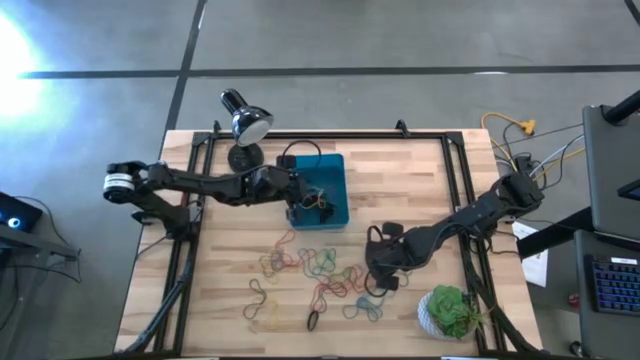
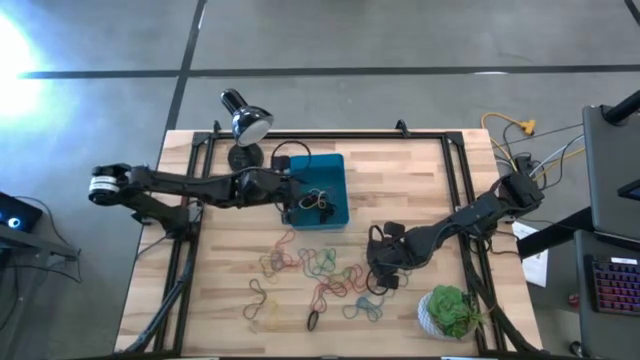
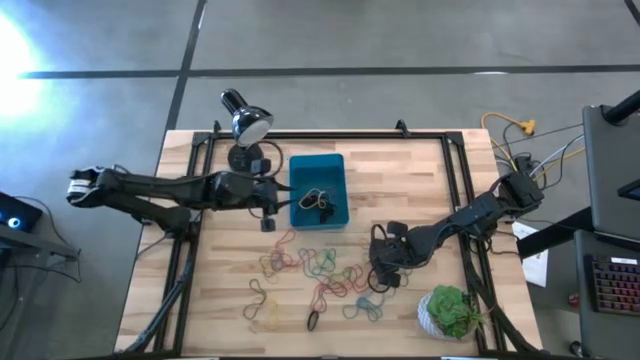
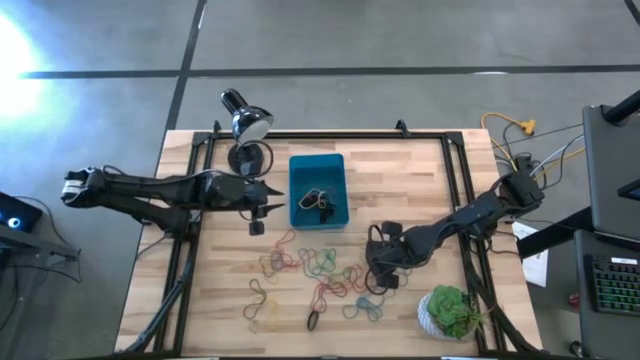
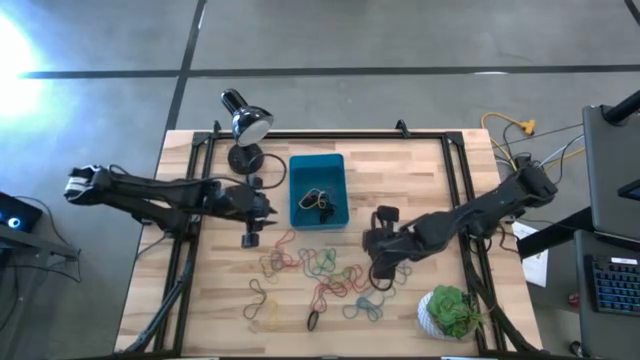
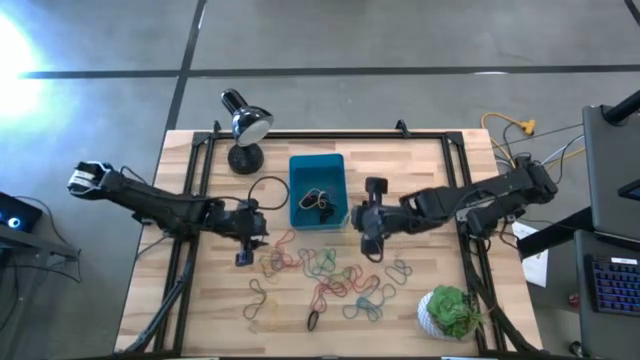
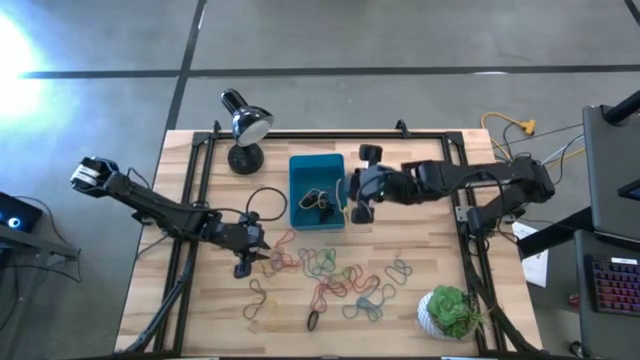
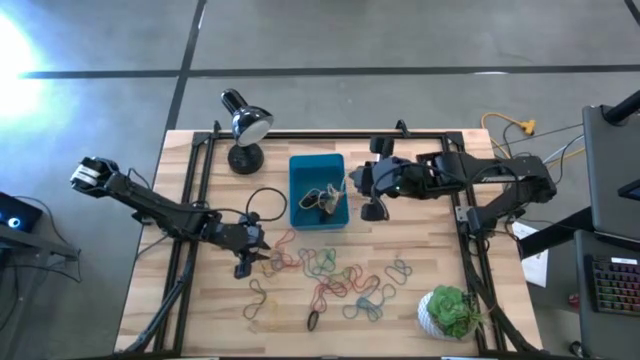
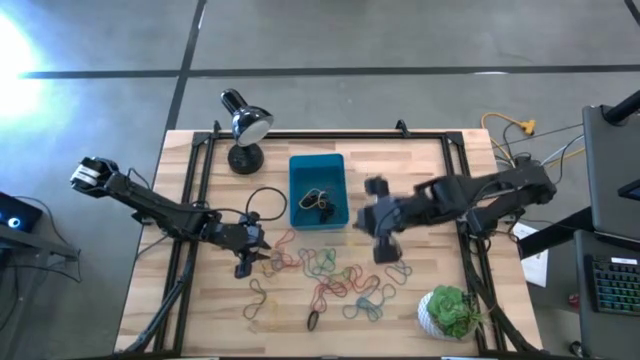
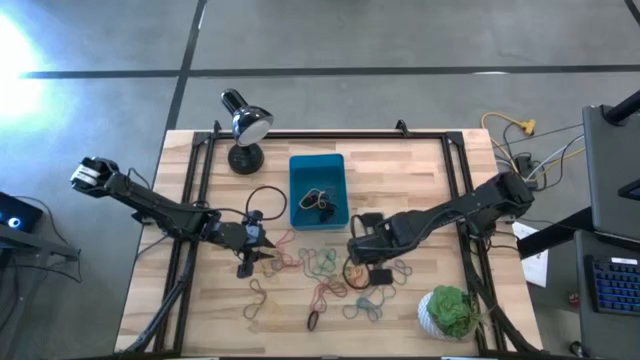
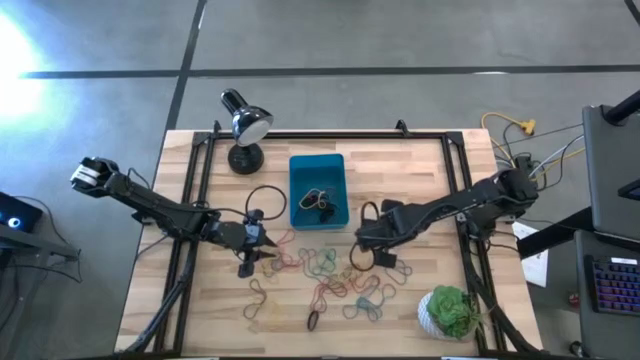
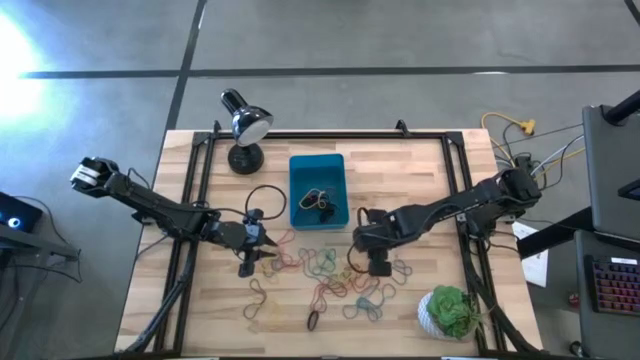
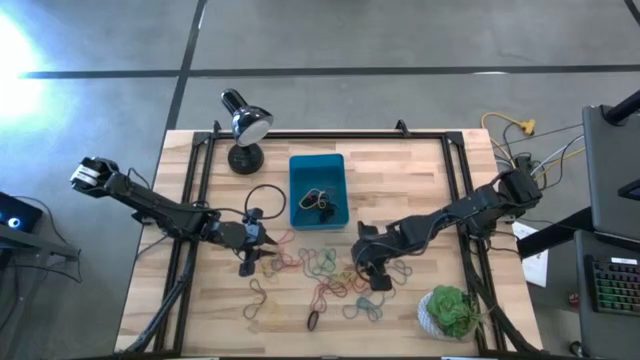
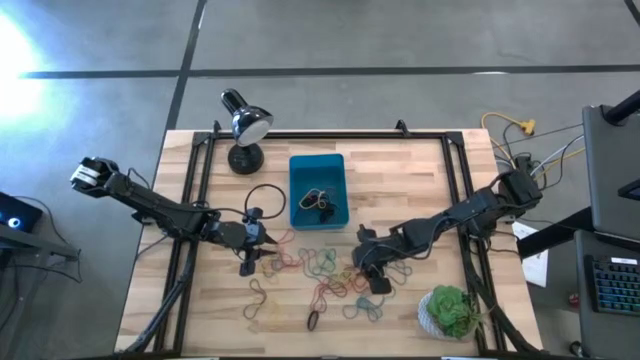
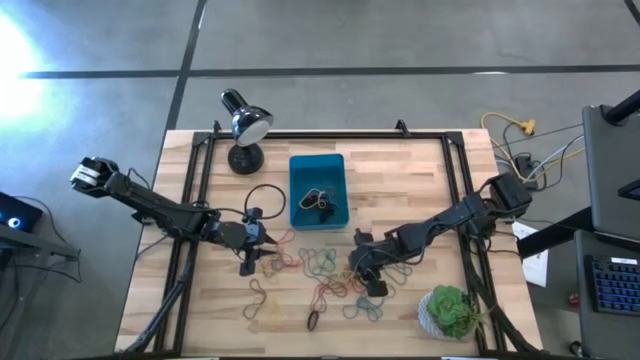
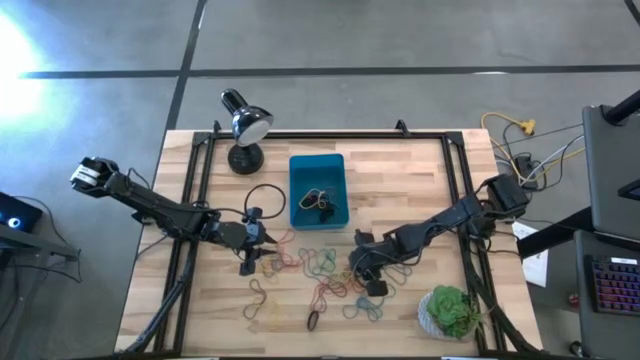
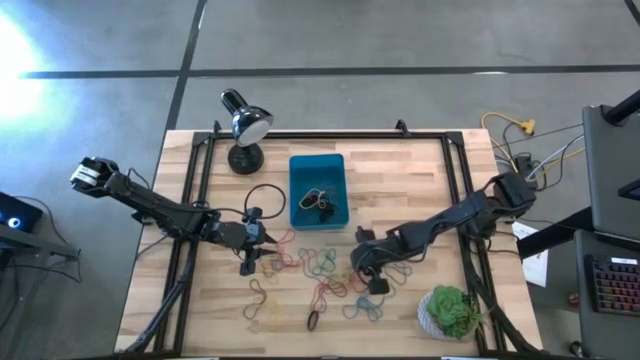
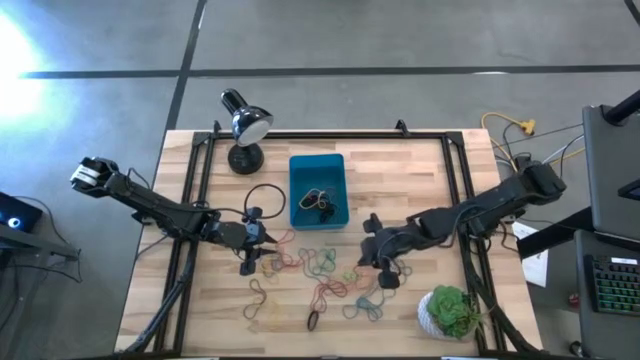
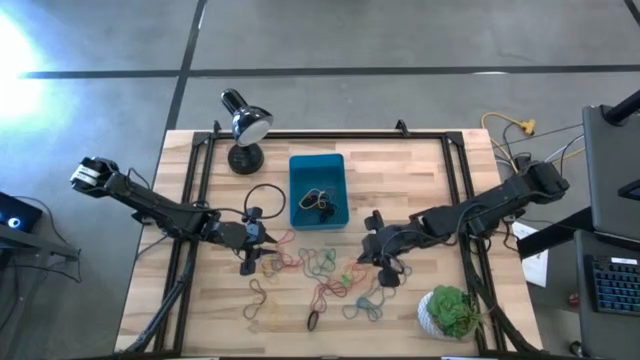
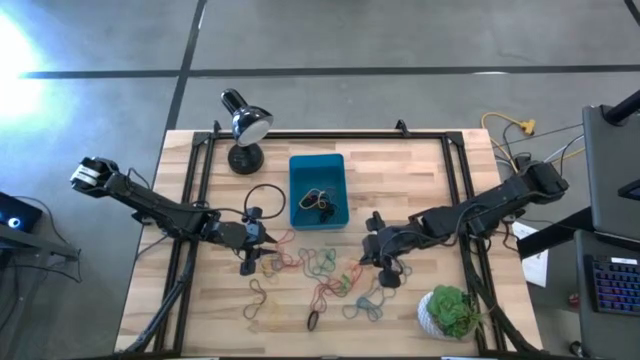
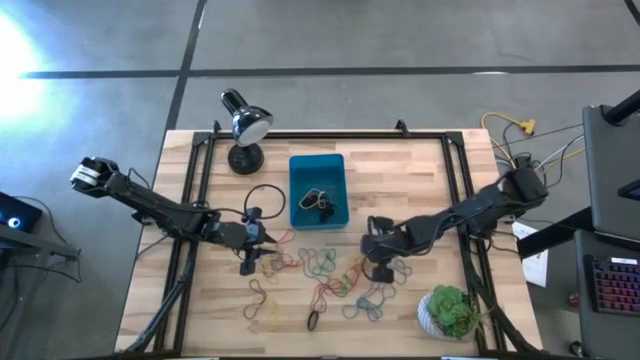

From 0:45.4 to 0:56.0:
Task: Pick and place rubber bands into bin
Put the yellow rubber band into the blue bin

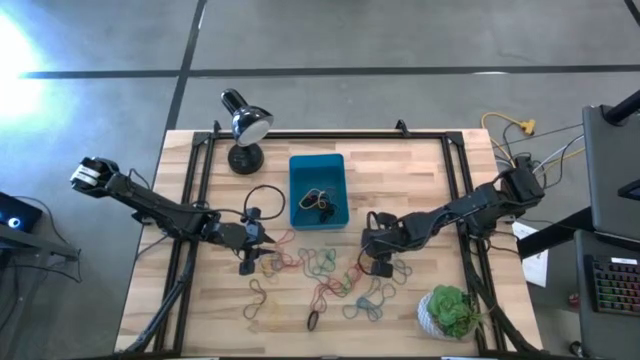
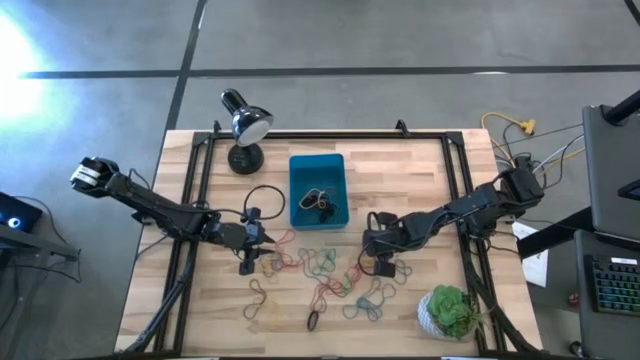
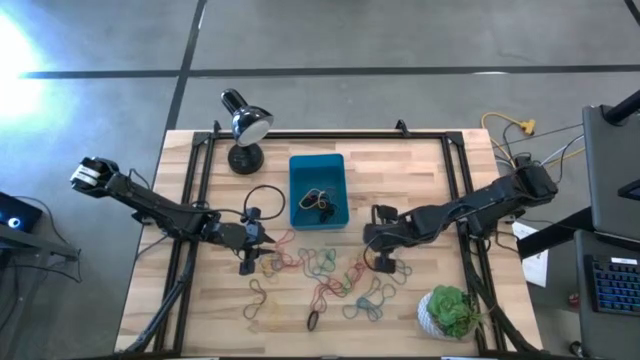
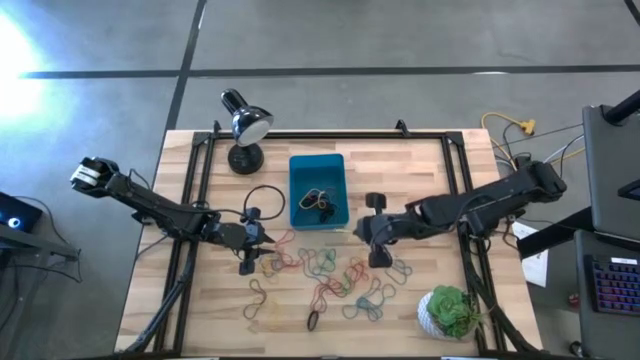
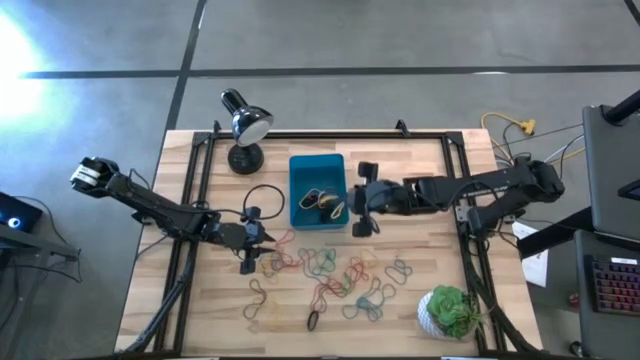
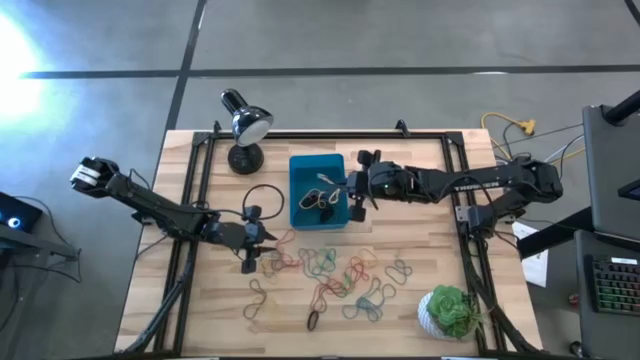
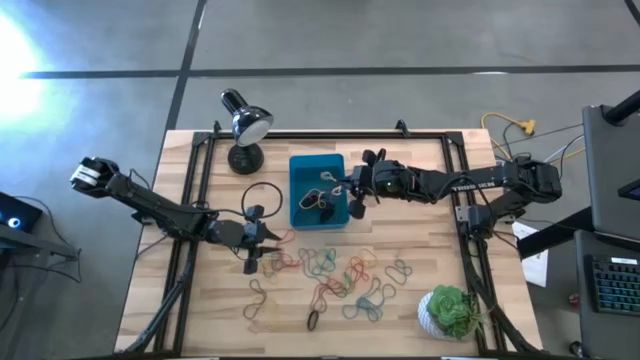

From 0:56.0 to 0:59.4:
Put the yellow rubber band into the blue bin

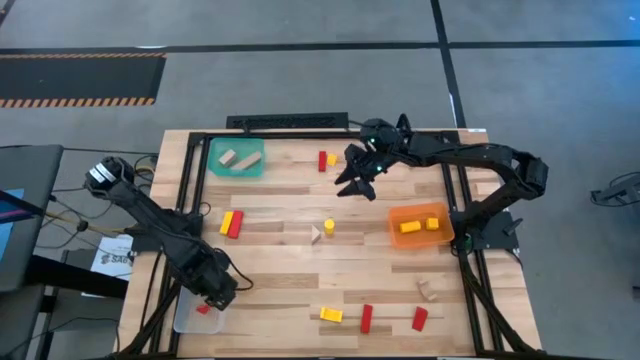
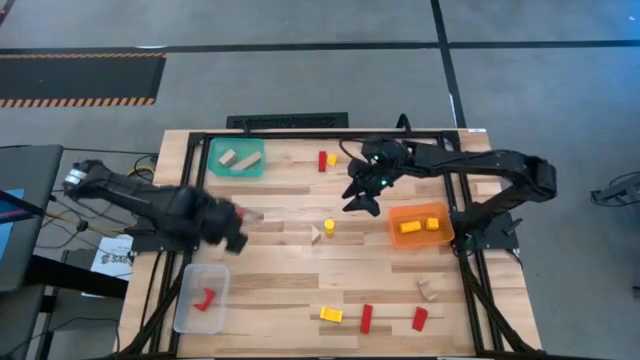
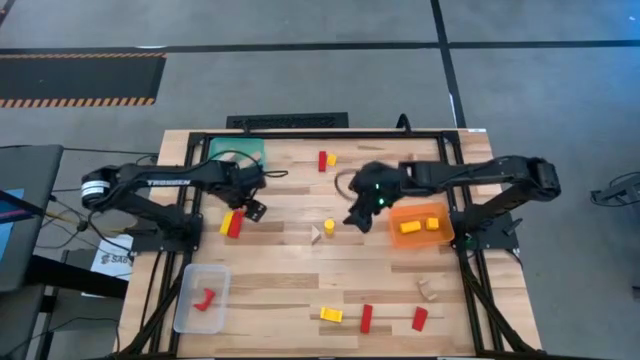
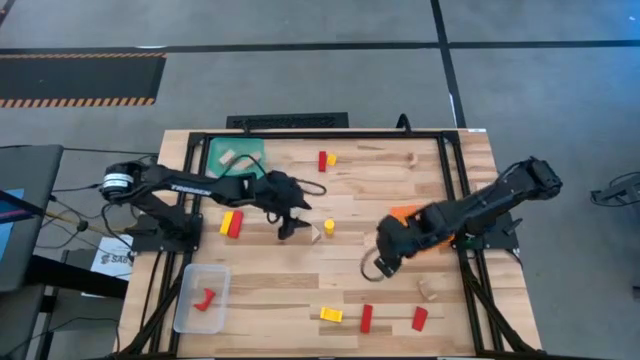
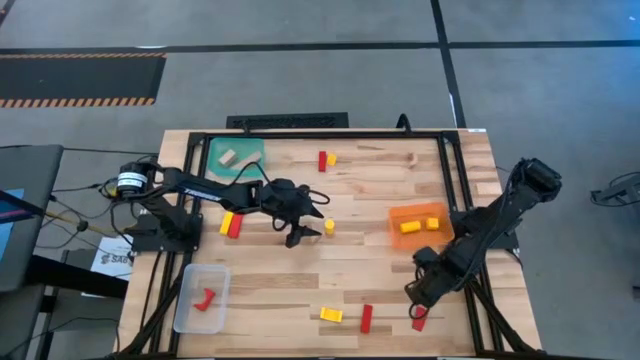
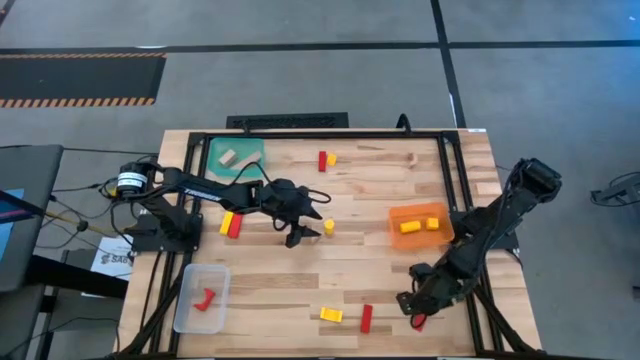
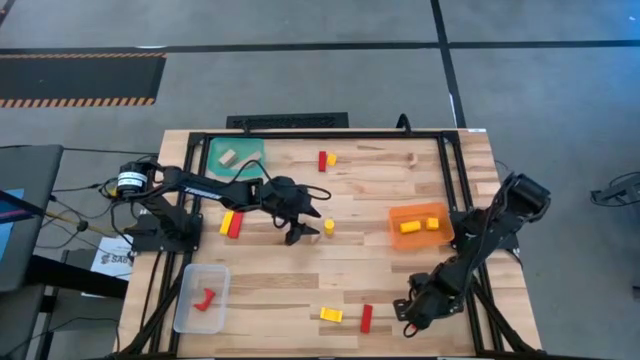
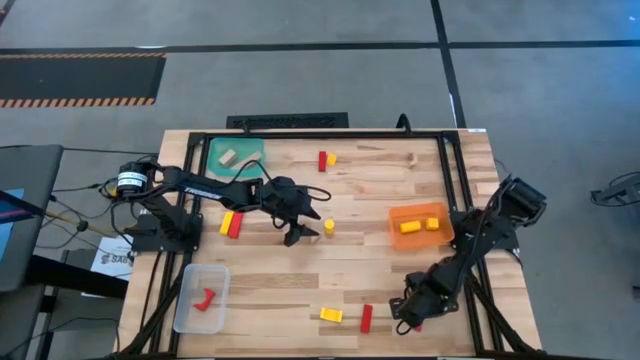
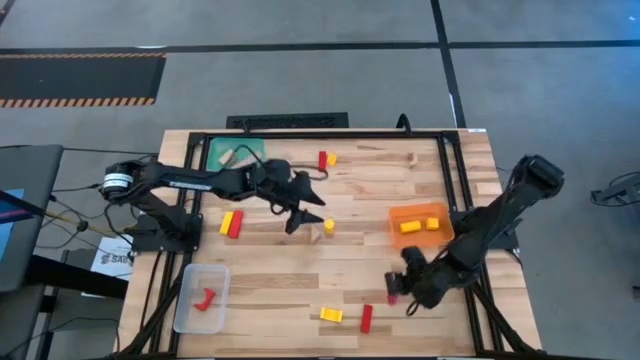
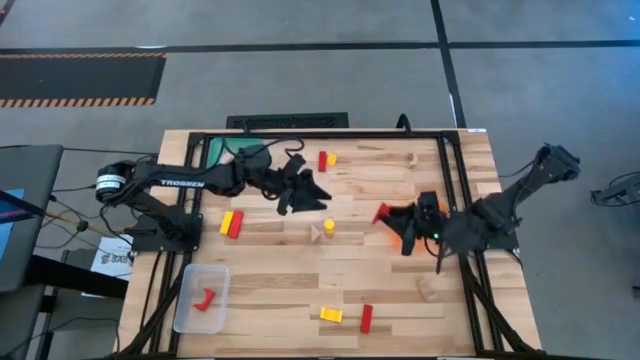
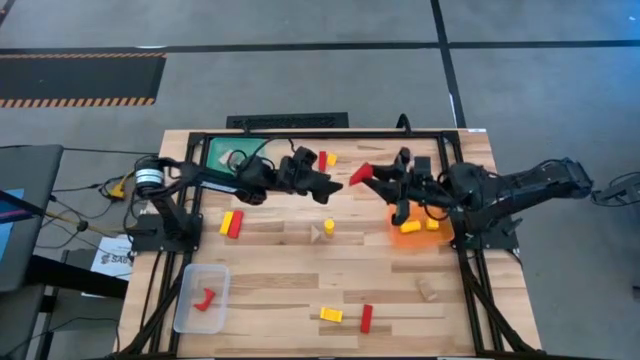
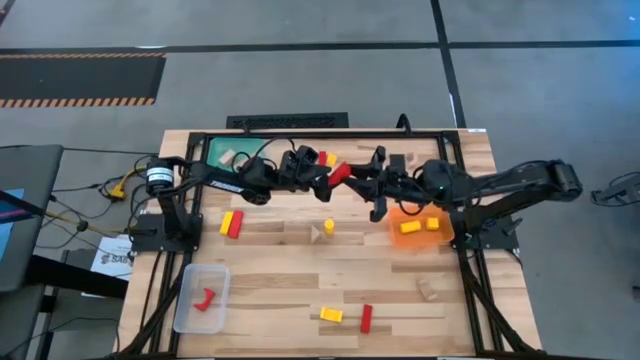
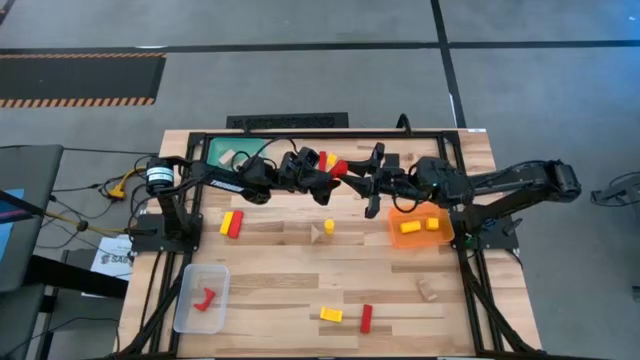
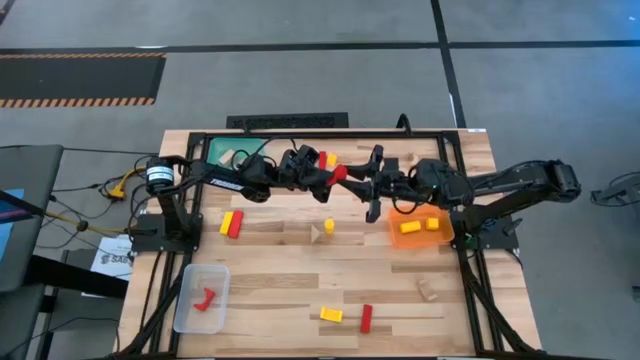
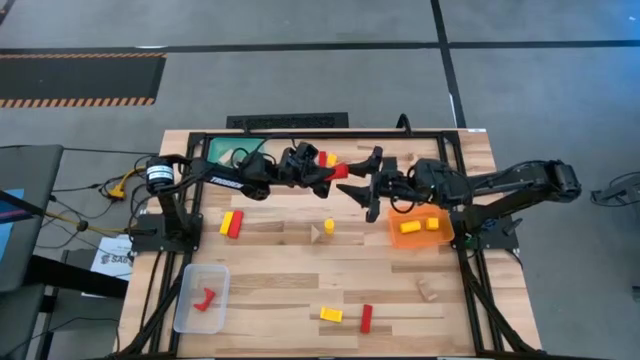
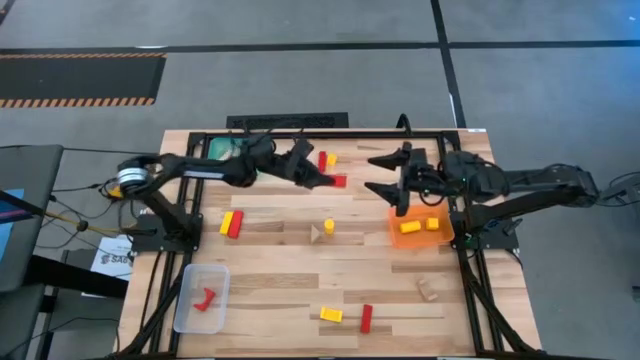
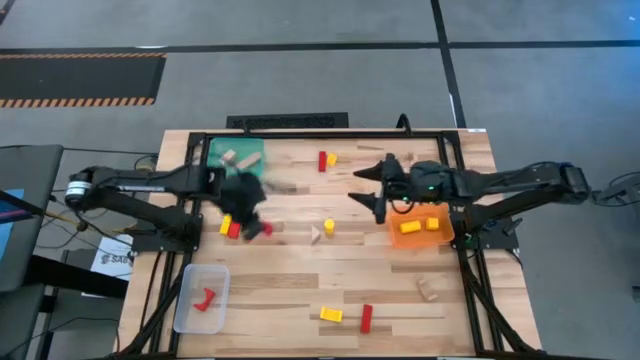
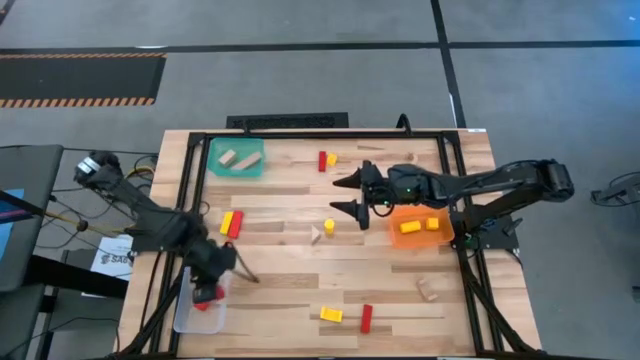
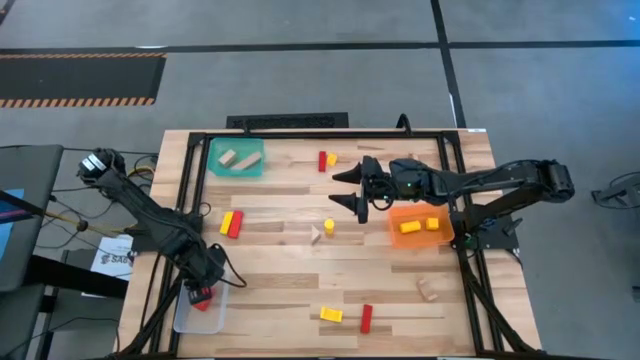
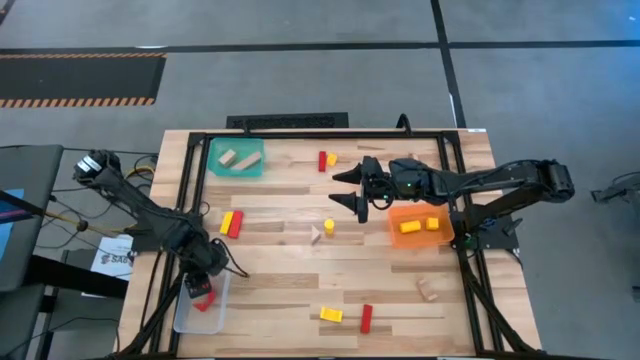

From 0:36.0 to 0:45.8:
Task: Sort & place blocks by color
Put the red block into the transparent bin
